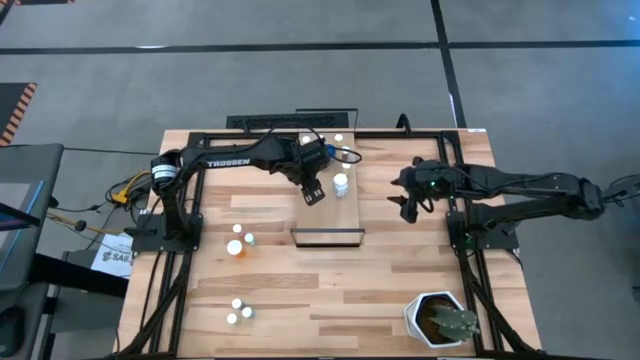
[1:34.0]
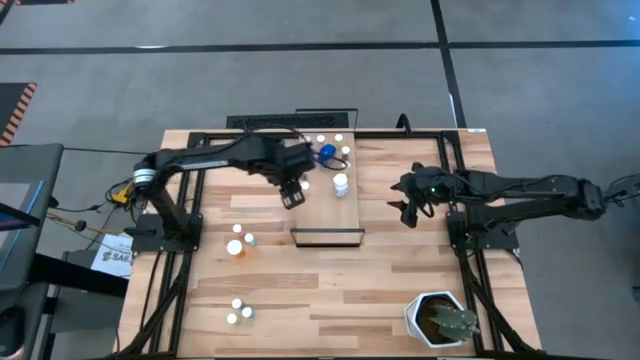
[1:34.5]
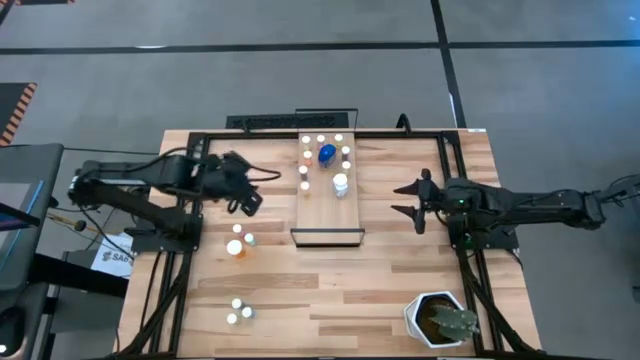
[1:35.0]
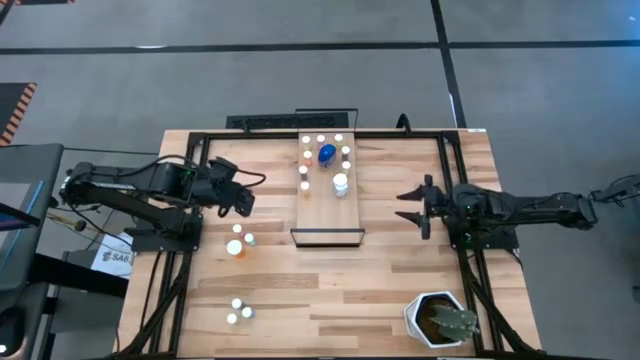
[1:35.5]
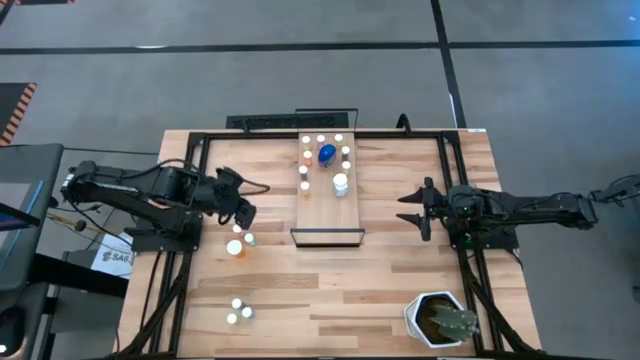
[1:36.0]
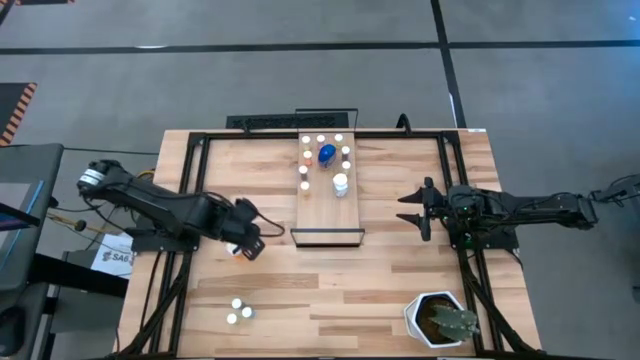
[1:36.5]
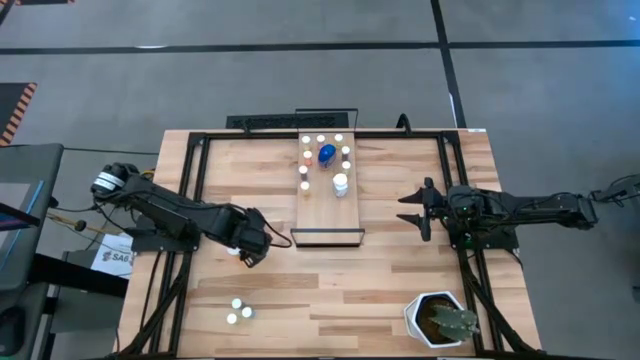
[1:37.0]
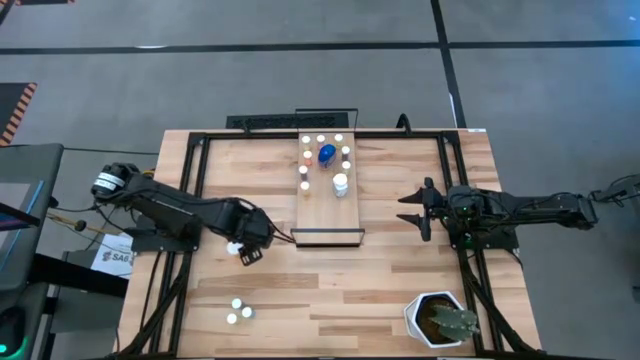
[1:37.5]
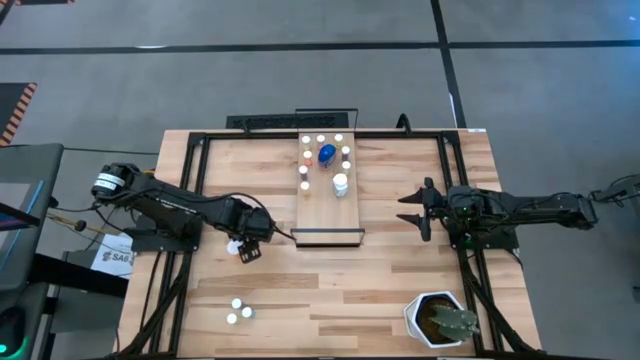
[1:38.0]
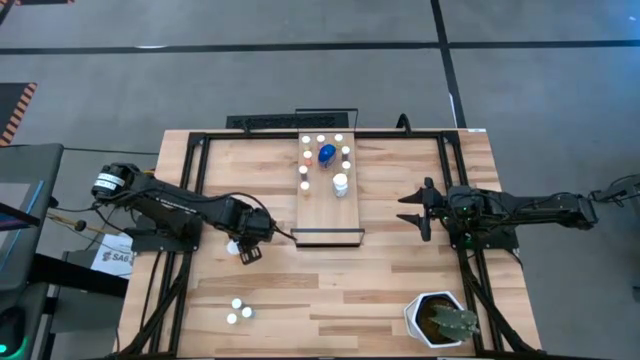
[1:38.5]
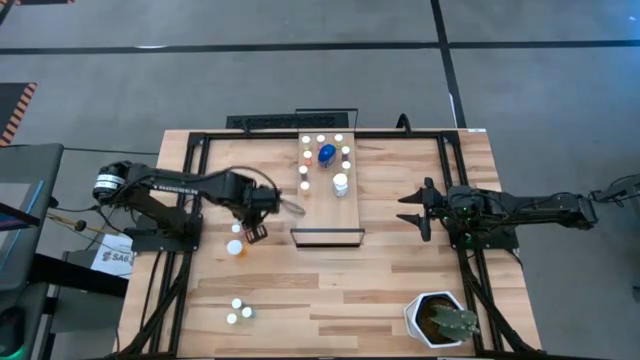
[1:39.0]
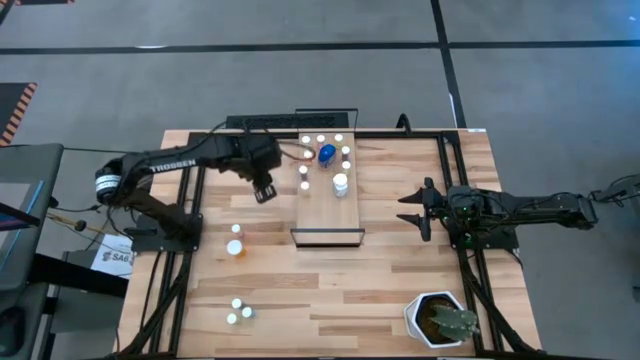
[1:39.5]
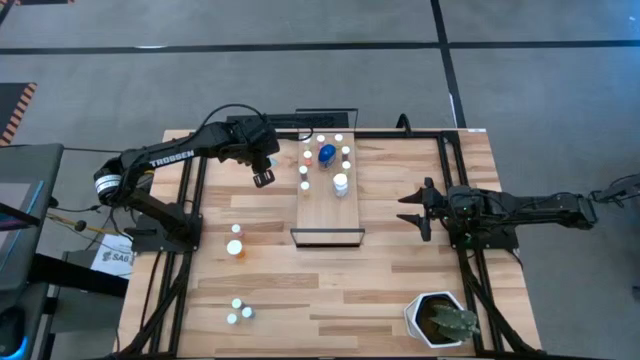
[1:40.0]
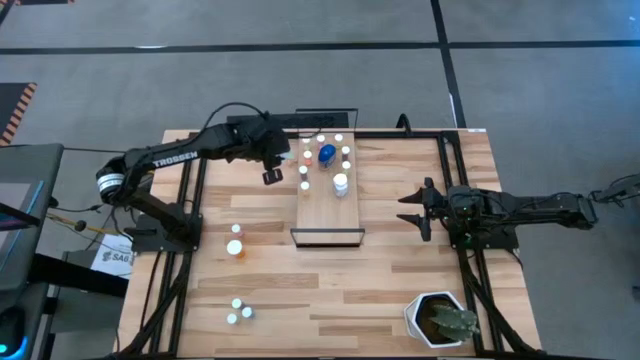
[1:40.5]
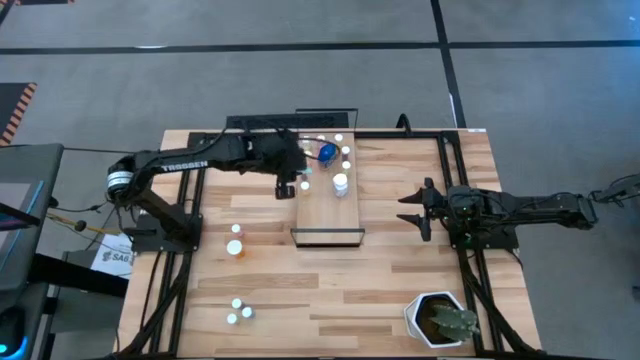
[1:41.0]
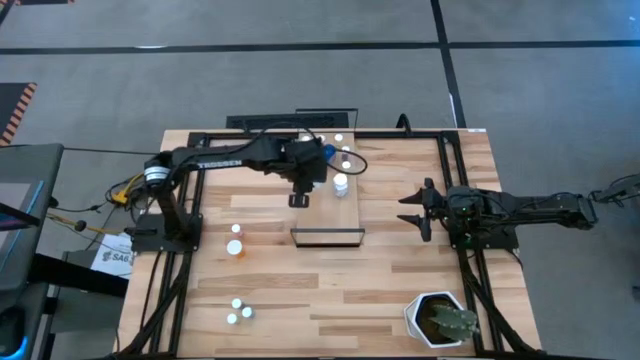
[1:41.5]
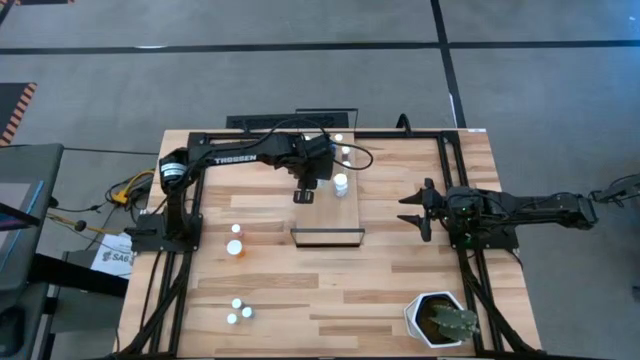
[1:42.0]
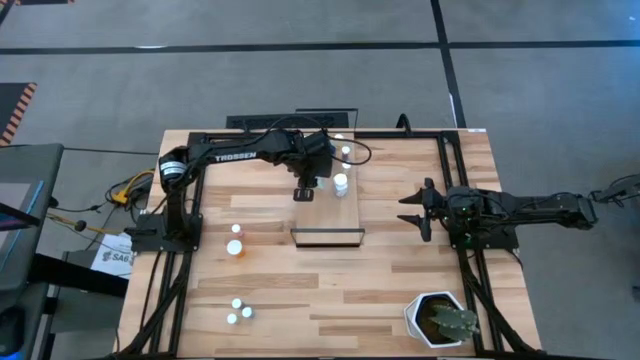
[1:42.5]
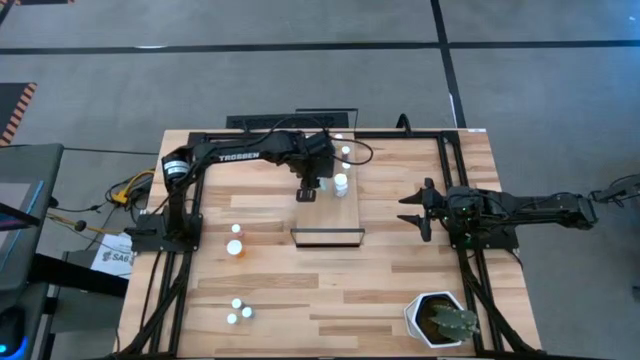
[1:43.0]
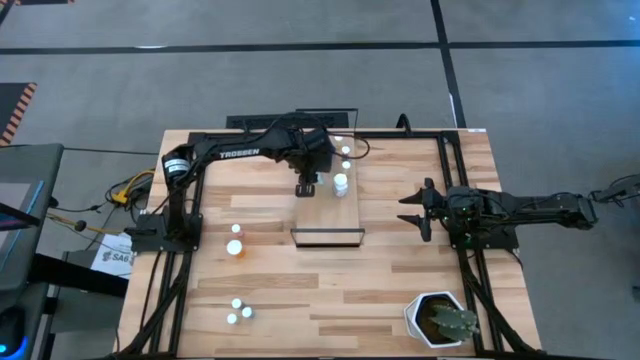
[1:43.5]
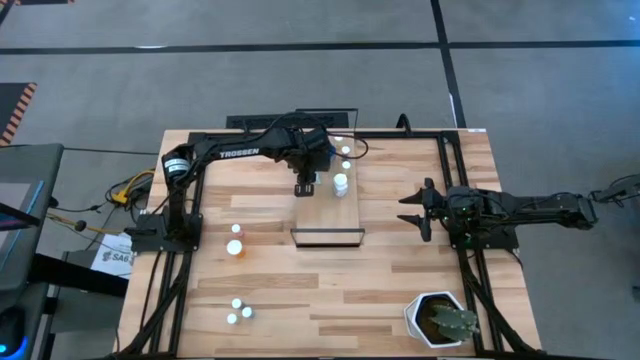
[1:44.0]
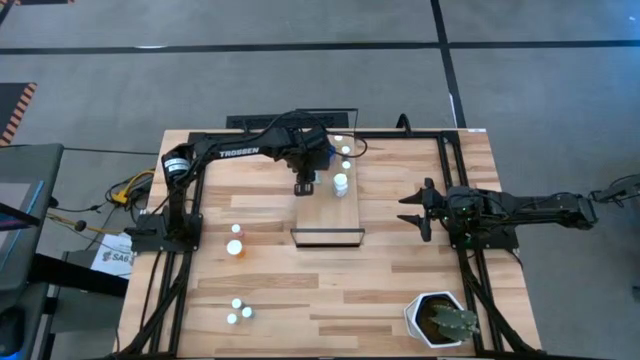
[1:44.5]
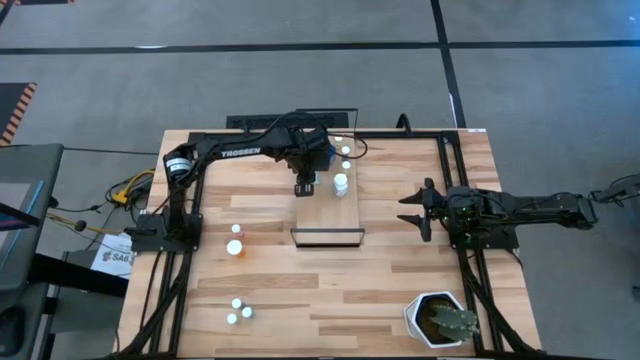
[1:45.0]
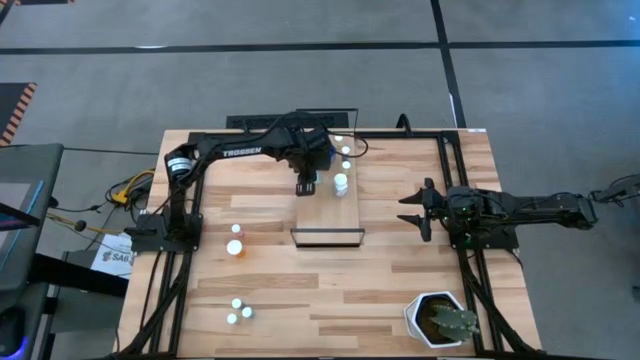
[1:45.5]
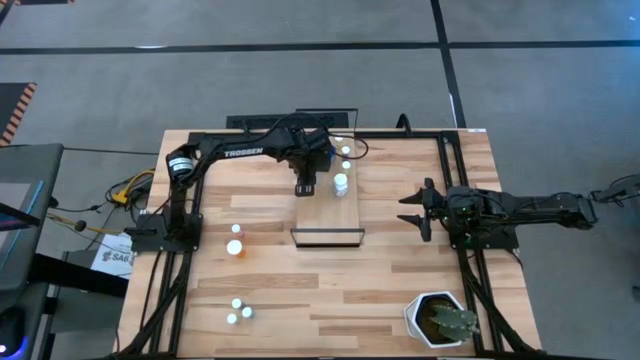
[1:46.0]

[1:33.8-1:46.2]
Task: Pick and place medicine bottles onto shelf by color
Put the blue pill bottle on the shelf

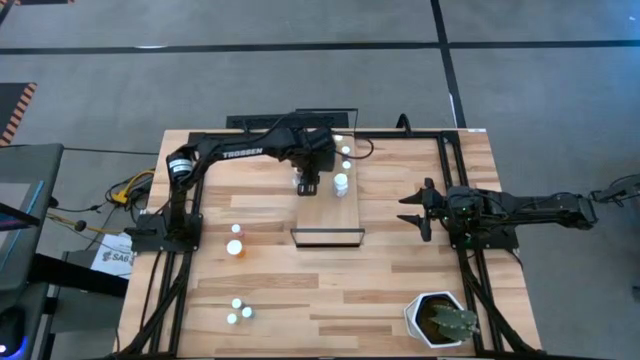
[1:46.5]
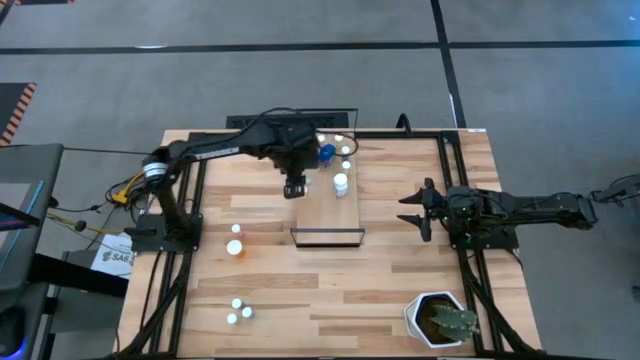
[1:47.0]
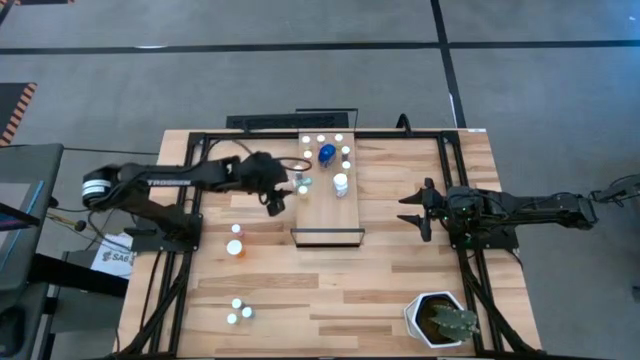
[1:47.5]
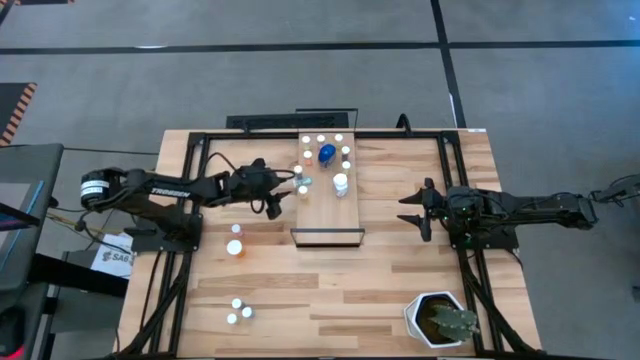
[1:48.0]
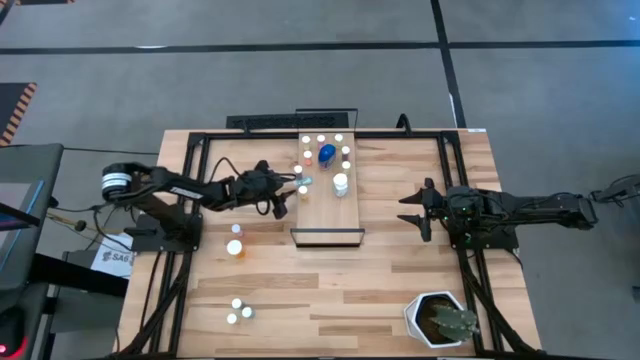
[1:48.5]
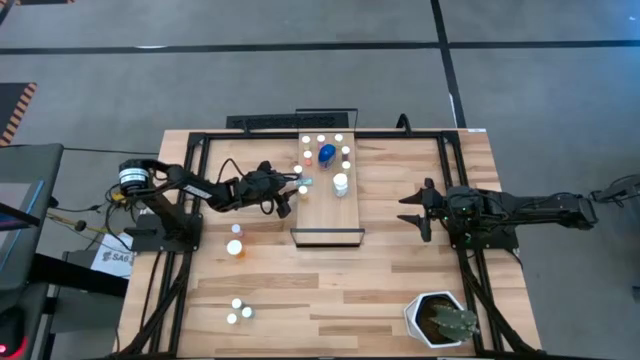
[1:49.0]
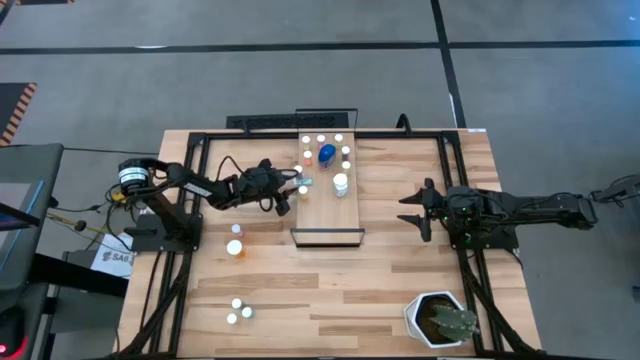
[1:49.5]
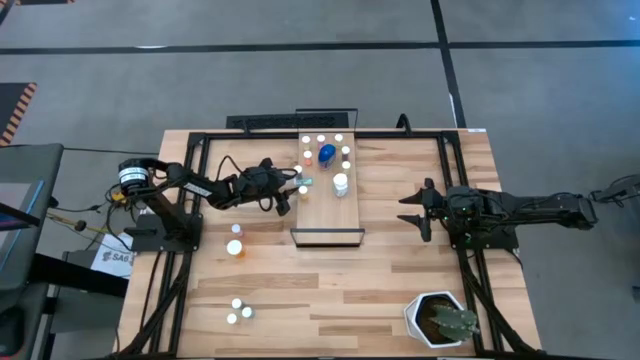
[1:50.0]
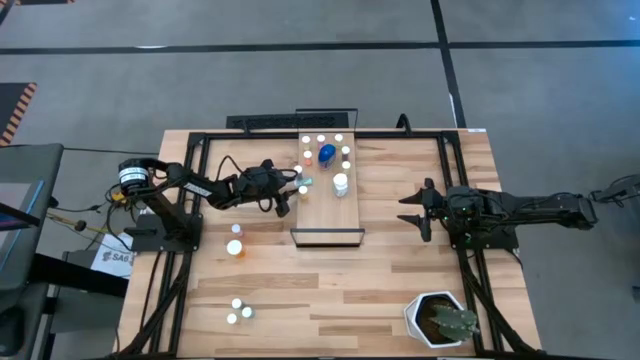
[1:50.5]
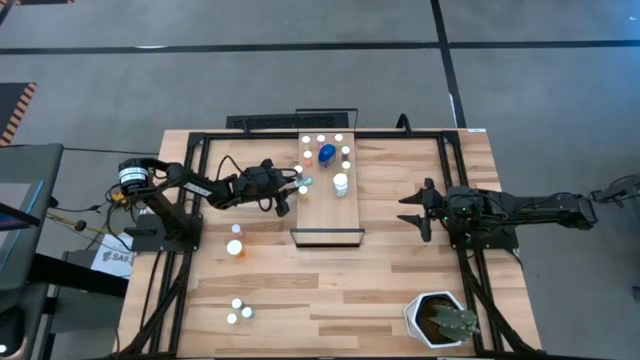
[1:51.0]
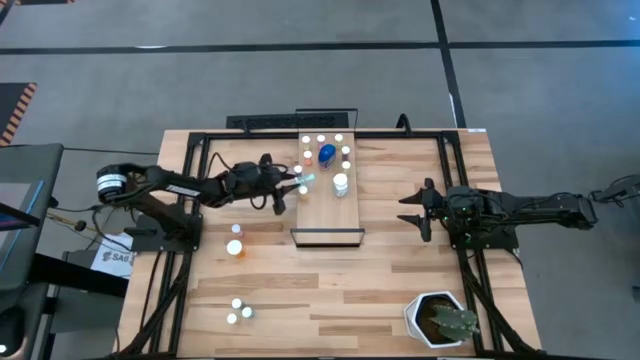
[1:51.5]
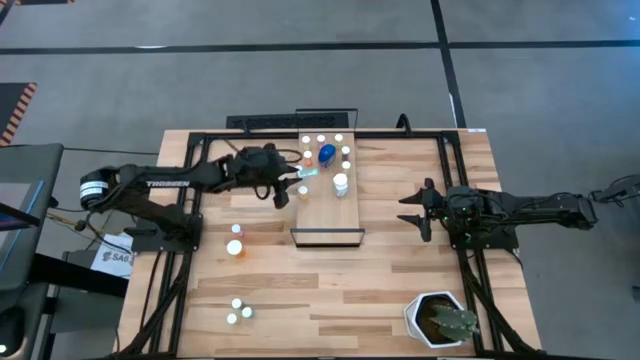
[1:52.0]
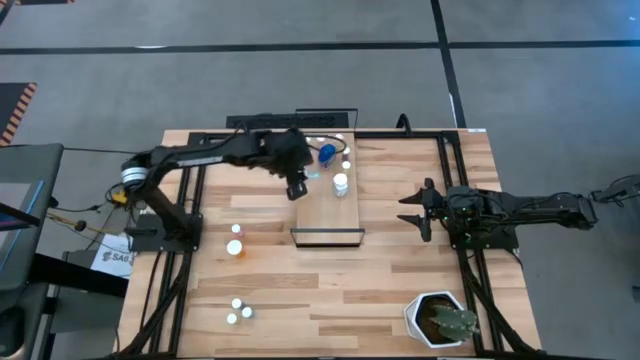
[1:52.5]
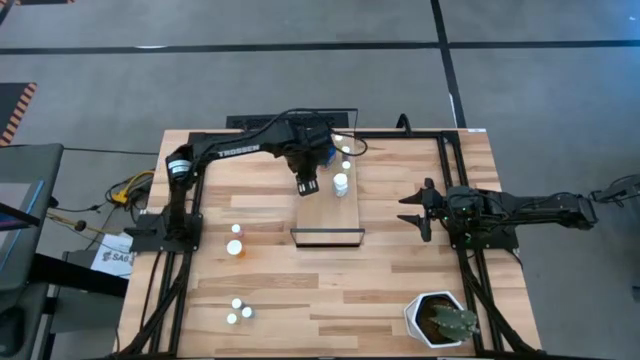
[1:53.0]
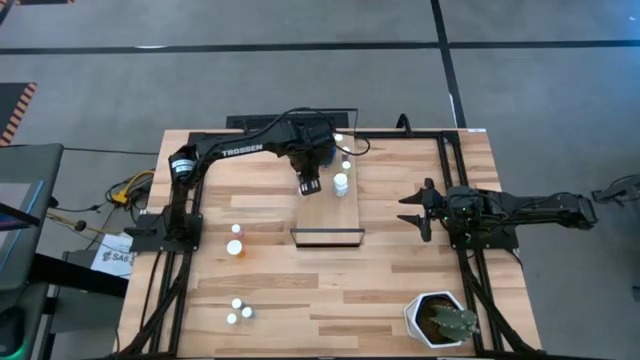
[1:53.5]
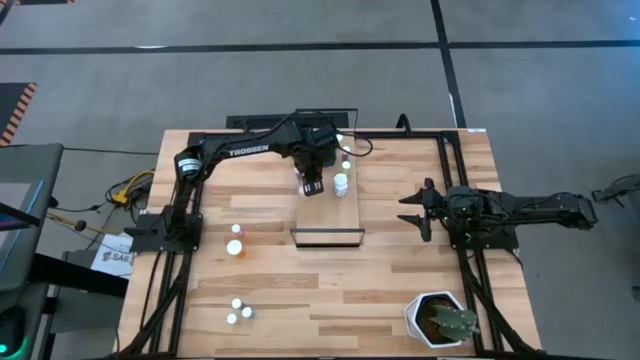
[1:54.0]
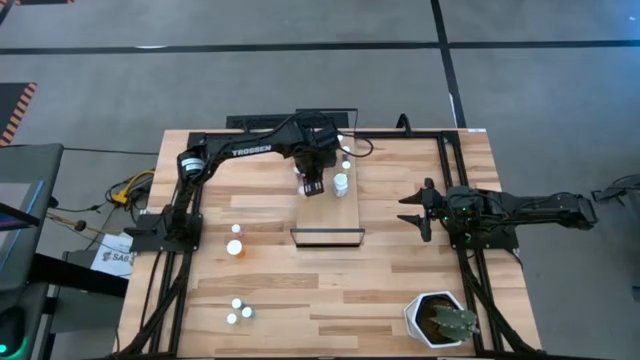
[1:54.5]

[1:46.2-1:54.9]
Put the blue pill bottle on the shelf
